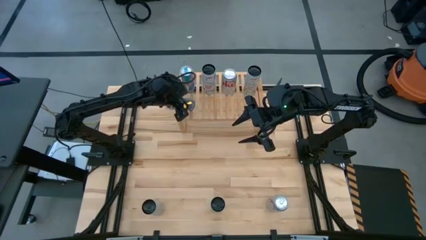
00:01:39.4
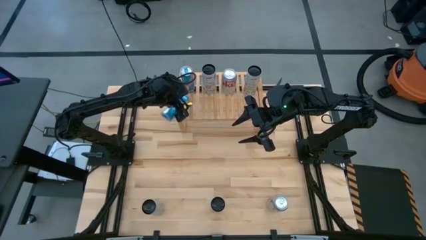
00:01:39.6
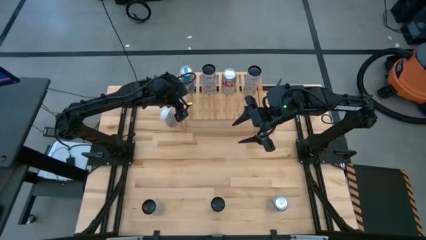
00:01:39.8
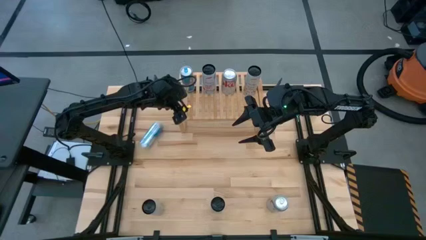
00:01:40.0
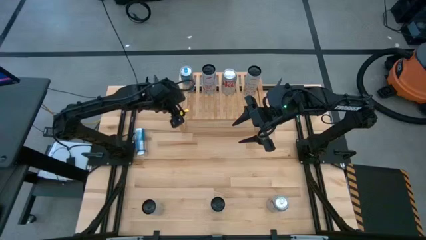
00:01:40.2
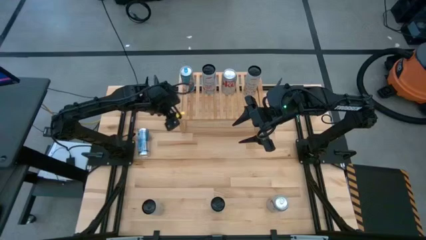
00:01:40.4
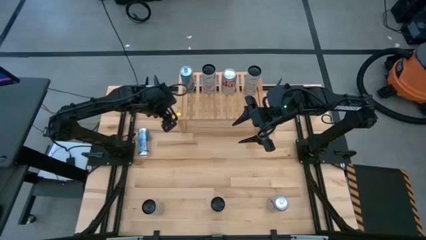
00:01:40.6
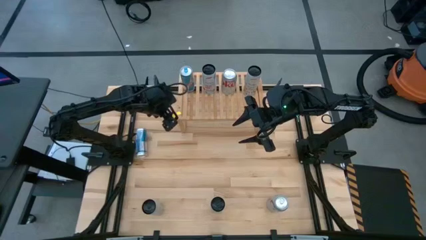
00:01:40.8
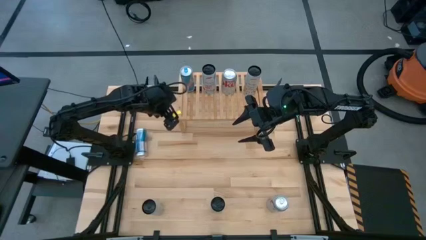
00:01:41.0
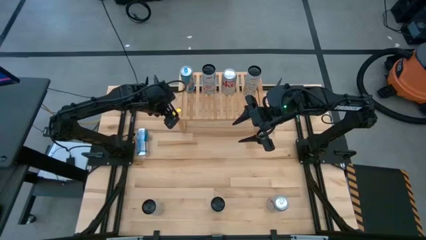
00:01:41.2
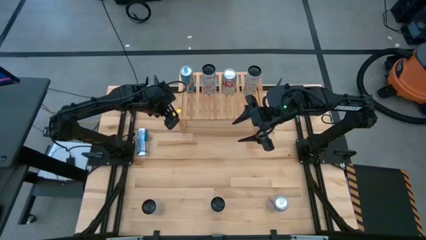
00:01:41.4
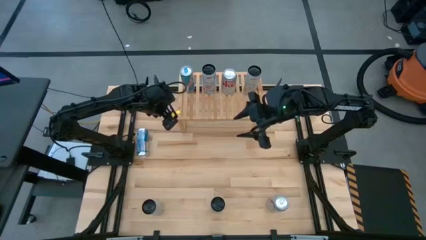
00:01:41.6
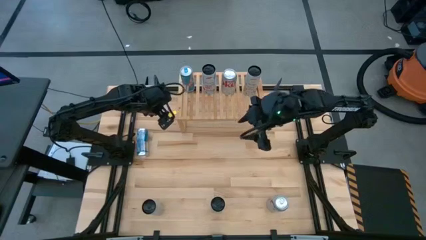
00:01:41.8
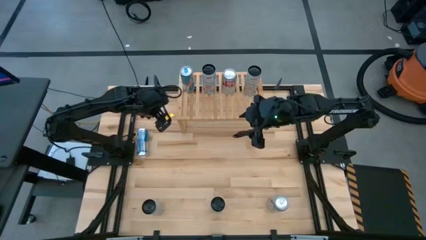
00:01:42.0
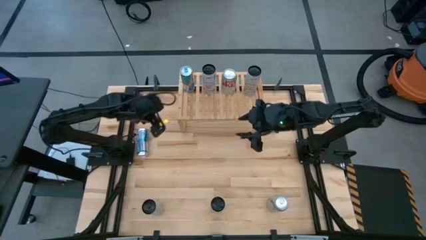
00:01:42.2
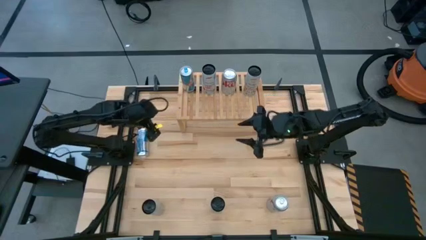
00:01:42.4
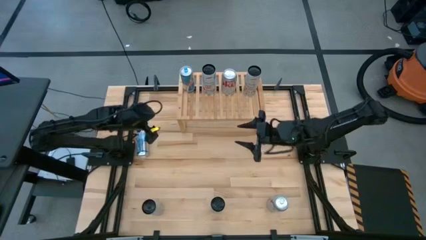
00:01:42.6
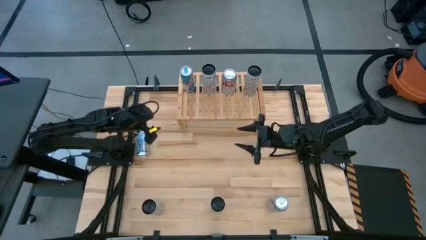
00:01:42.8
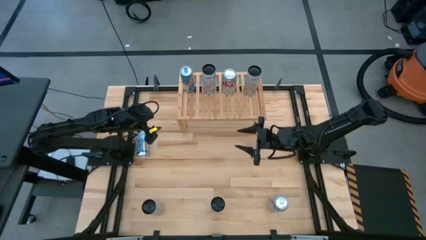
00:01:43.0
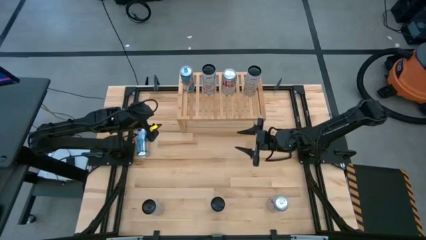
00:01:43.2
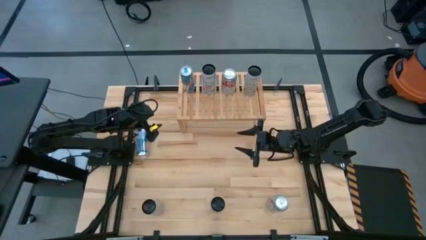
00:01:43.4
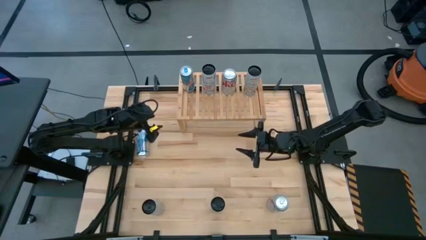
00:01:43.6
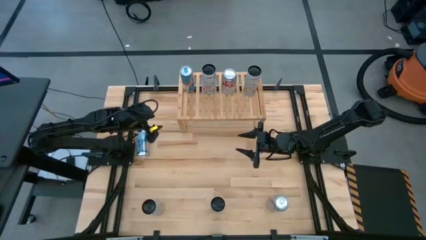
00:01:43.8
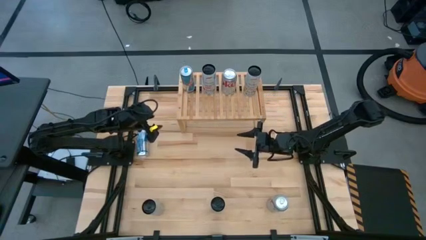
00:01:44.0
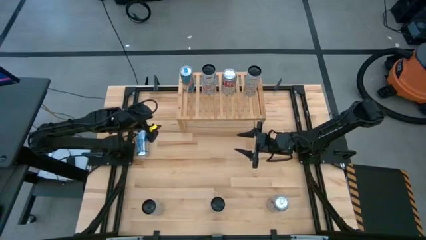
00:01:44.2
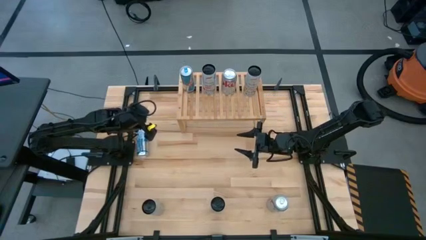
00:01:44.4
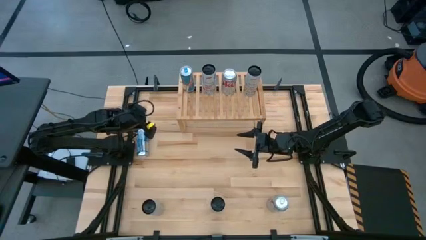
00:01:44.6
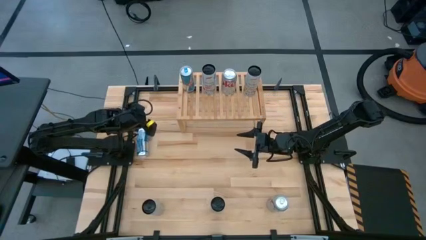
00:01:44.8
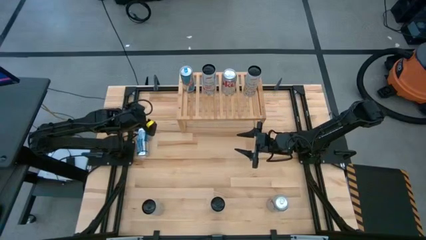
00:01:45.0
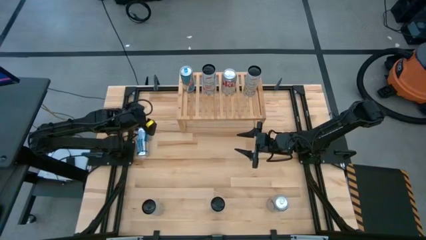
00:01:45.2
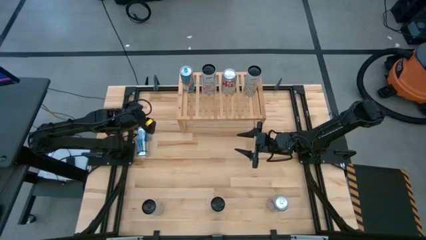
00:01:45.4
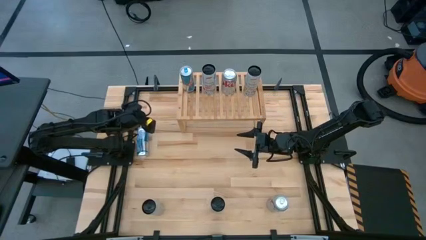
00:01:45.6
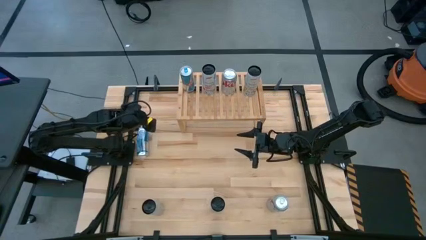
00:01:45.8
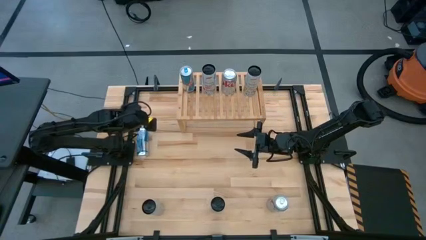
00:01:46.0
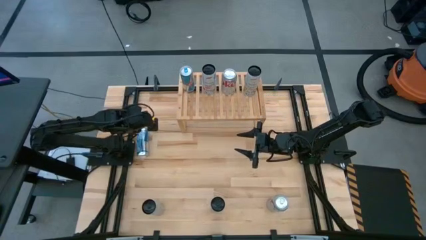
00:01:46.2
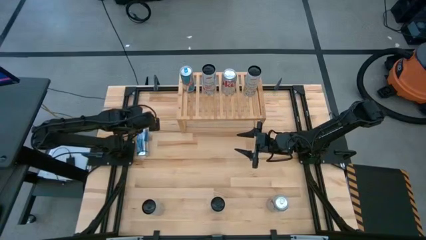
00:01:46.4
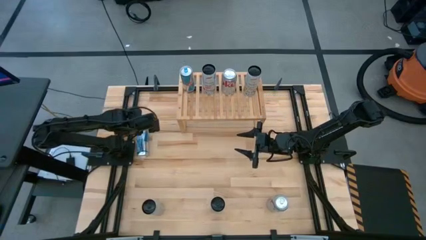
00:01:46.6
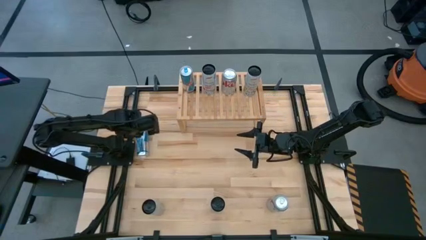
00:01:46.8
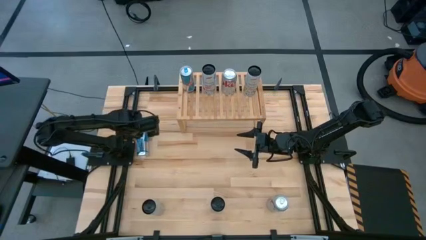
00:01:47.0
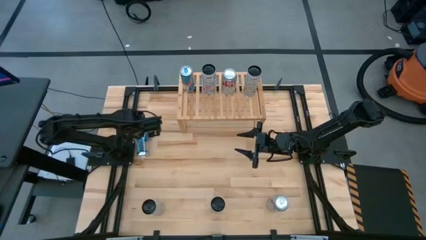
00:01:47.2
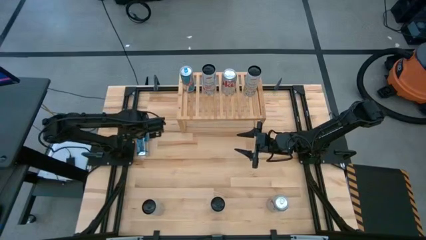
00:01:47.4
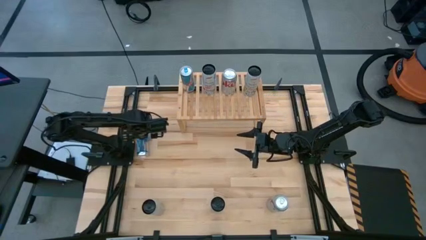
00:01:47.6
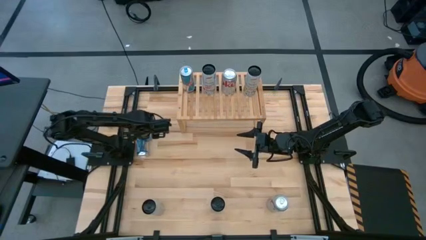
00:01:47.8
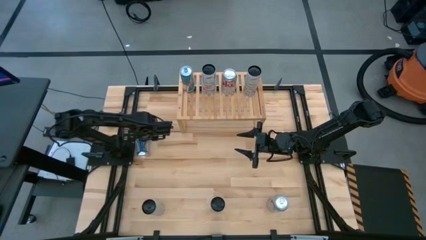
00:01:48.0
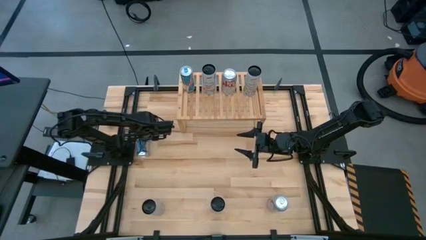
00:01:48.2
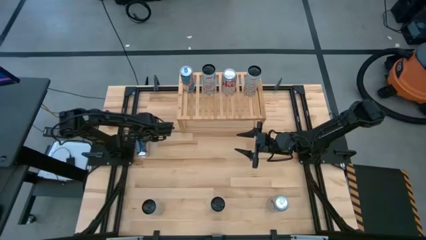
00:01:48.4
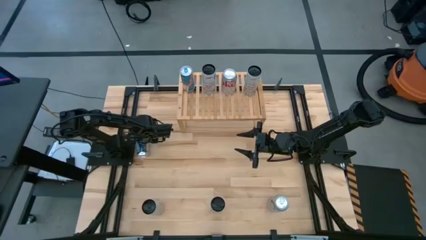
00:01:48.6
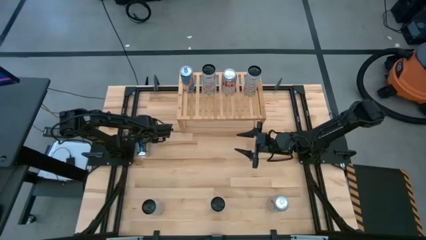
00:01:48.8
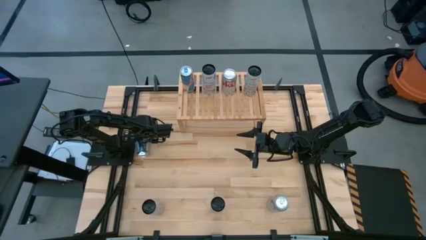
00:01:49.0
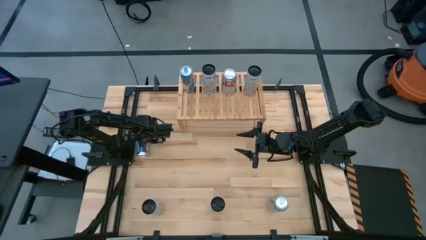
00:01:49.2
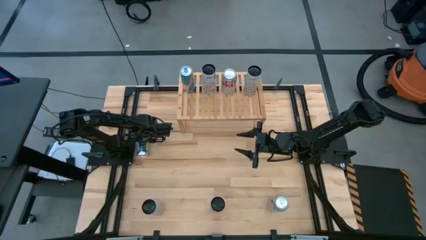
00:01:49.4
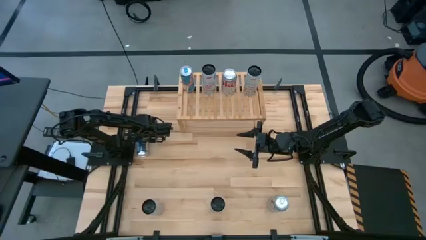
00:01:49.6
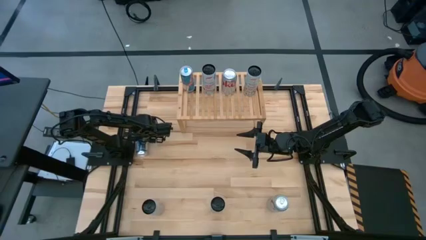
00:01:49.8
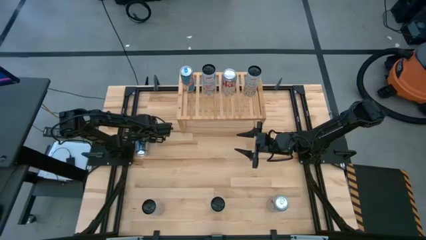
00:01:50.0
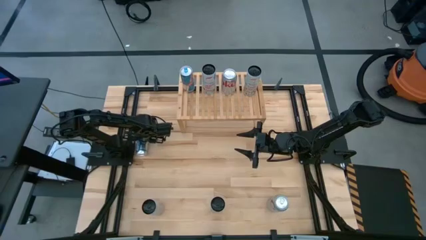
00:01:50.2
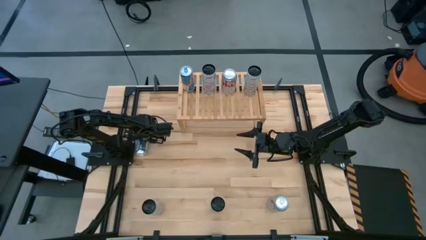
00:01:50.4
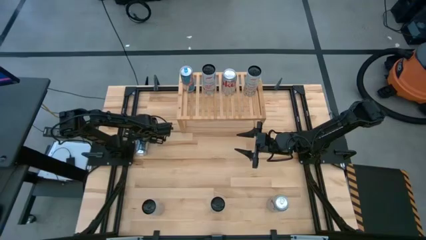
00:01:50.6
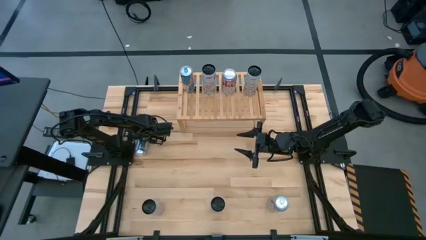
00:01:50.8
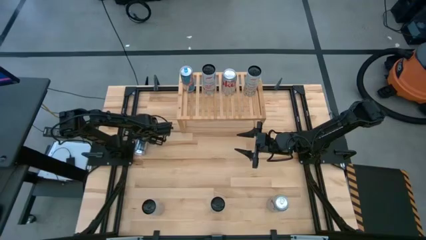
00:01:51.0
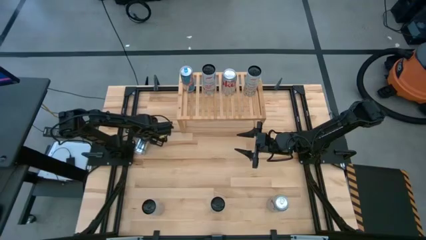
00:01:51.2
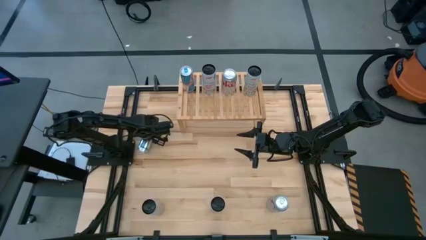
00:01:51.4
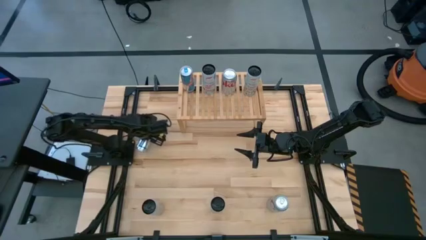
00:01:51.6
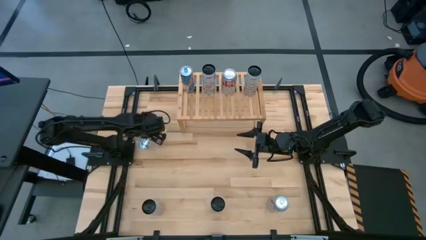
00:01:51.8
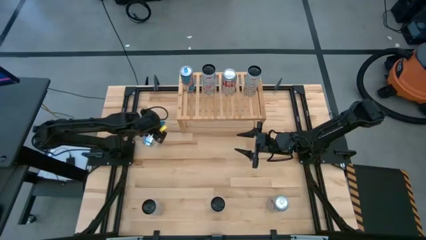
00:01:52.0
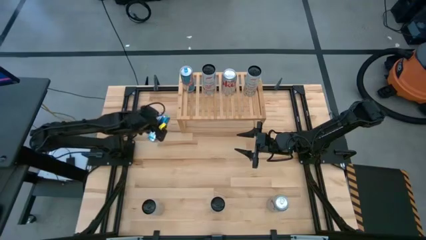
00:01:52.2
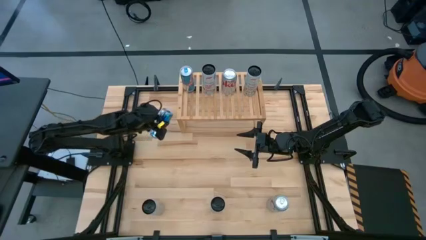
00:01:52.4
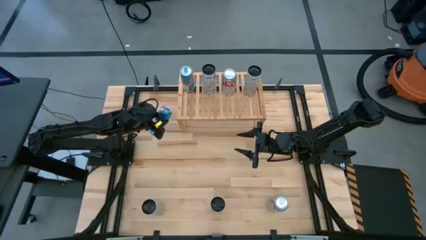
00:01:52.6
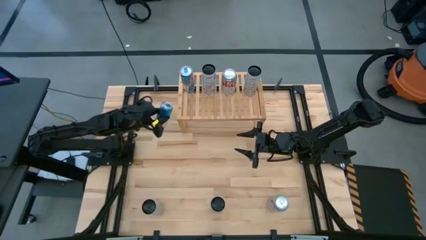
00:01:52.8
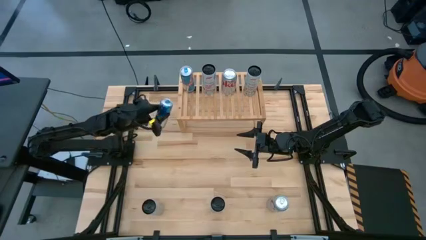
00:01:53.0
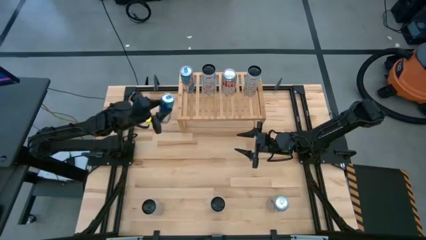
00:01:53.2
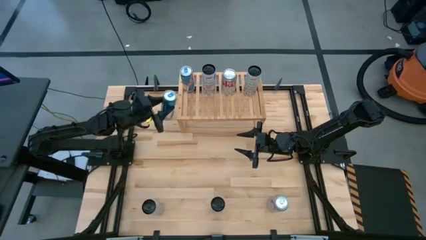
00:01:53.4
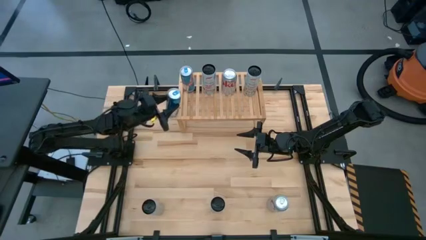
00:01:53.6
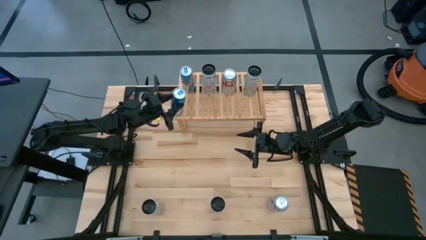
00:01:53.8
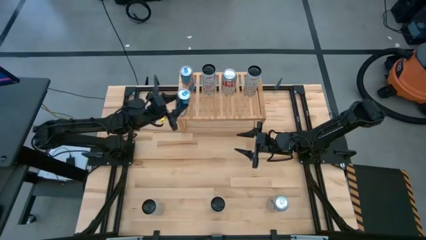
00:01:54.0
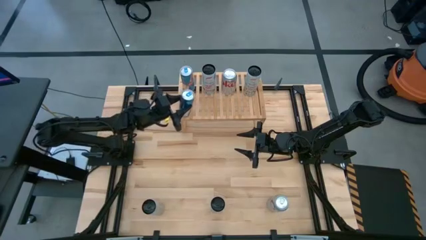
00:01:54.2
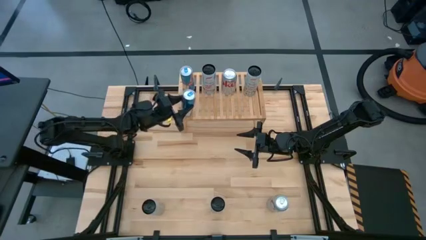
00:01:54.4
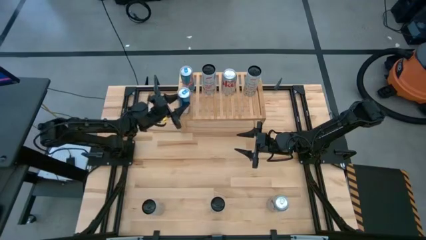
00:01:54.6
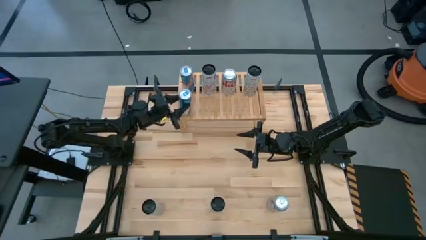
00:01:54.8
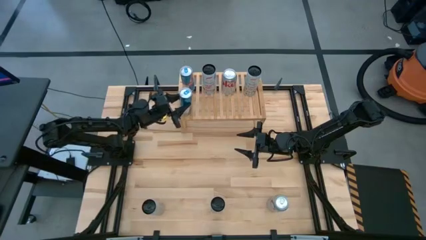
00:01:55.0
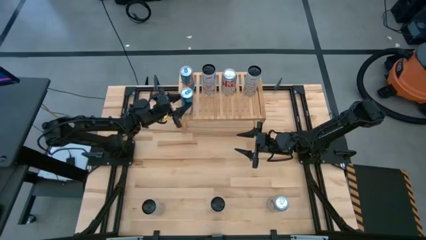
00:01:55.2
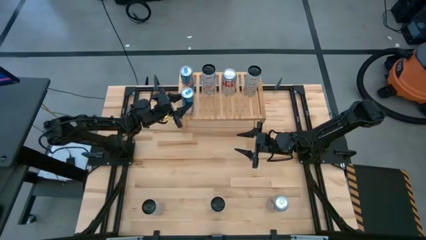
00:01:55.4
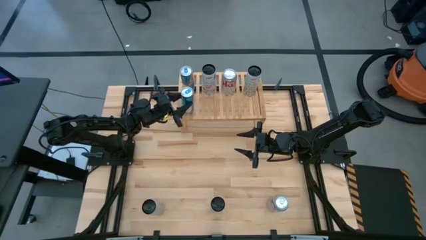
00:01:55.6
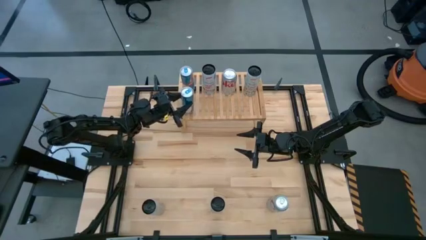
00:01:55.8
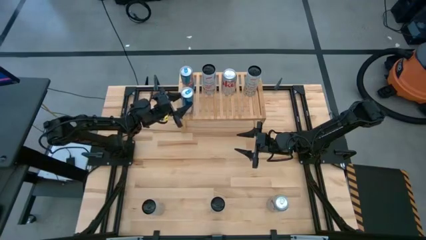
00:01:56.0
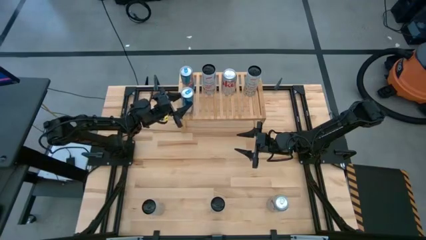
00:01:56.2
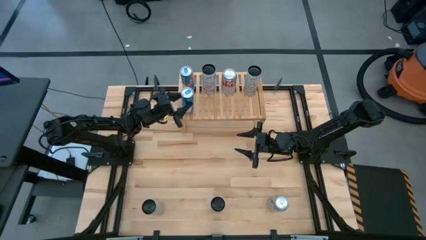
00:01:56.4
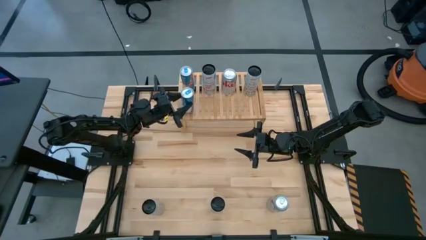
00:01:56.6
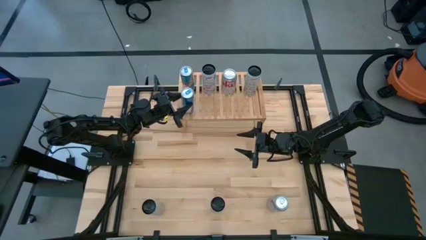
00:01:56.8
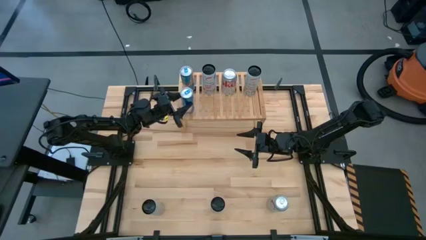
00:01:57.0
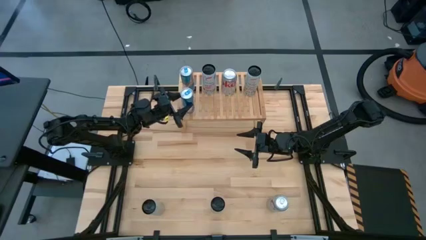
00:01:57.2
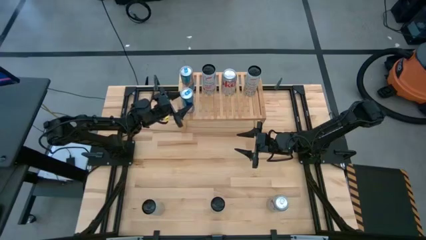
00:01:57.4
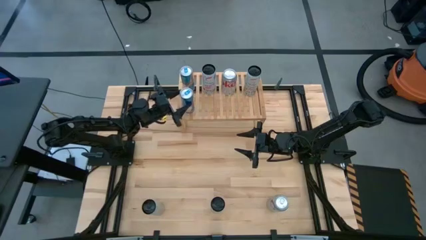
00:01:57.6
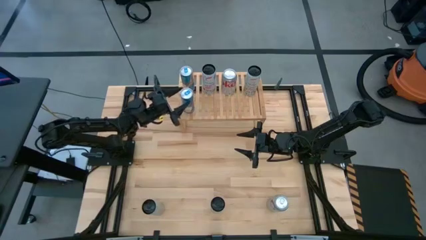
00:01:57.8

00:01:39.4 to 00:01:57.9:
Task: Place canned beverage on shelf
Put the blue soda can on the shelf aligned with the other blue soda cans
